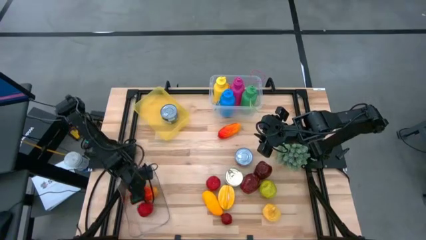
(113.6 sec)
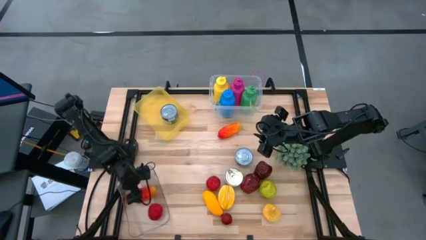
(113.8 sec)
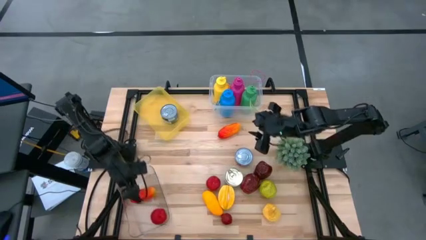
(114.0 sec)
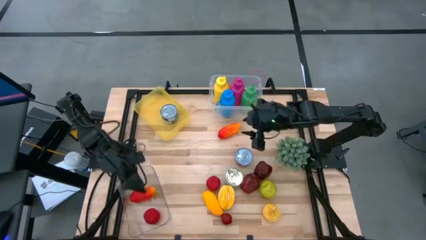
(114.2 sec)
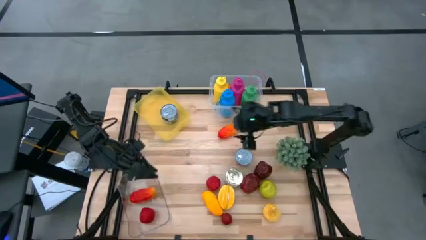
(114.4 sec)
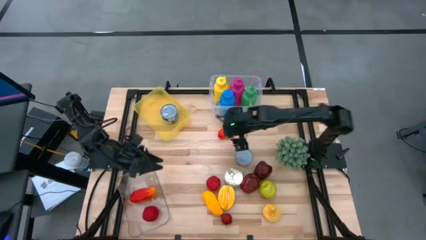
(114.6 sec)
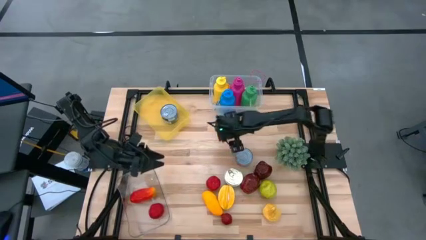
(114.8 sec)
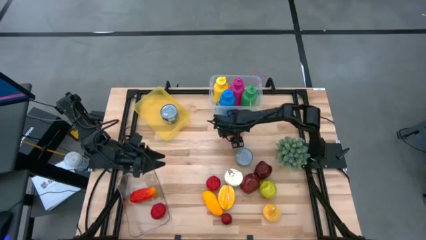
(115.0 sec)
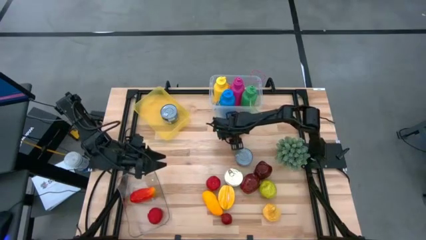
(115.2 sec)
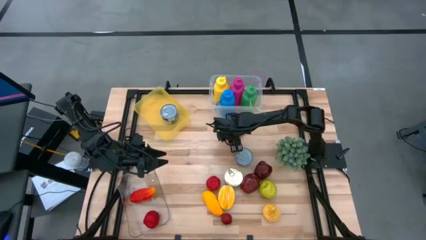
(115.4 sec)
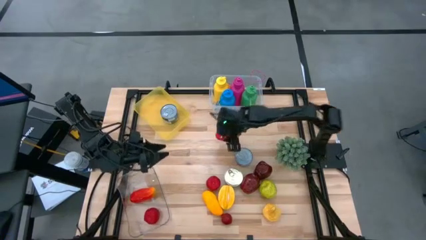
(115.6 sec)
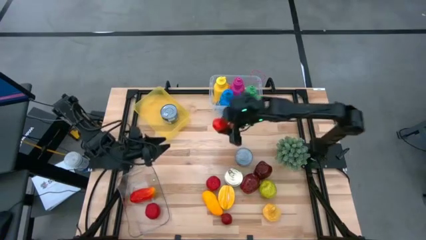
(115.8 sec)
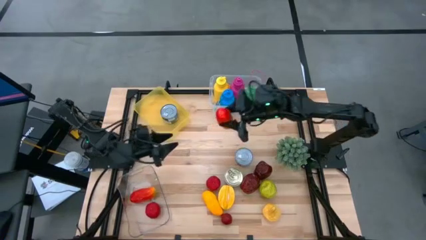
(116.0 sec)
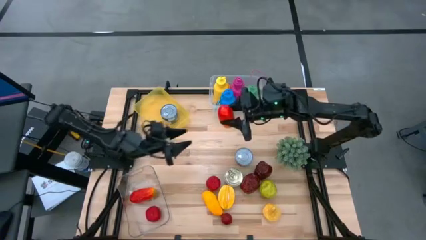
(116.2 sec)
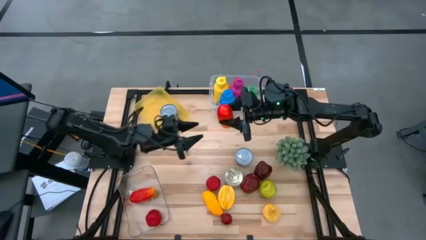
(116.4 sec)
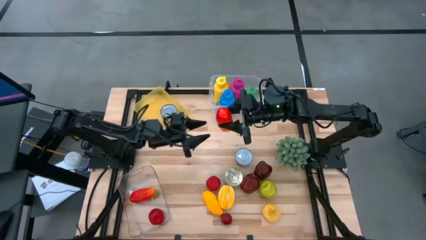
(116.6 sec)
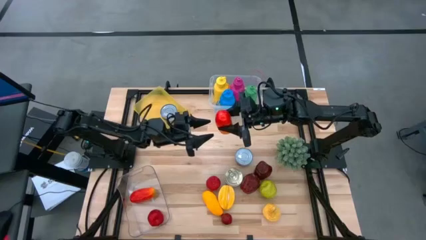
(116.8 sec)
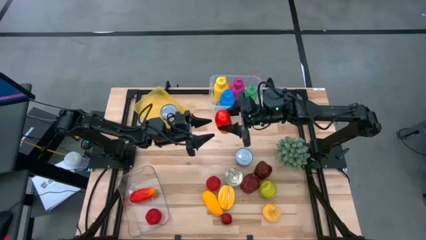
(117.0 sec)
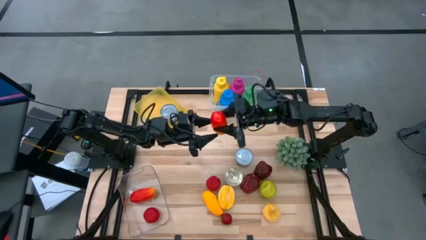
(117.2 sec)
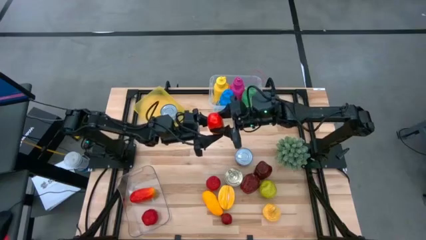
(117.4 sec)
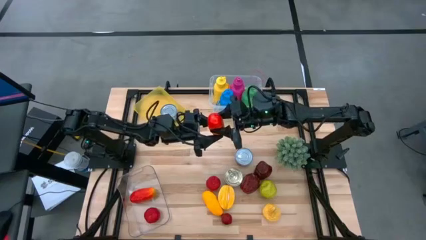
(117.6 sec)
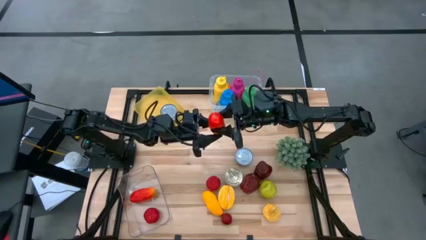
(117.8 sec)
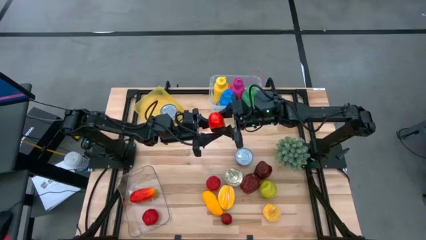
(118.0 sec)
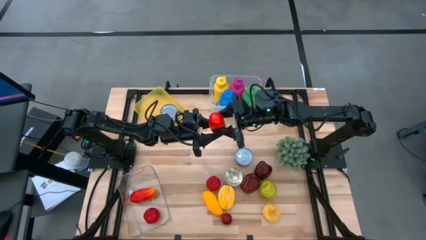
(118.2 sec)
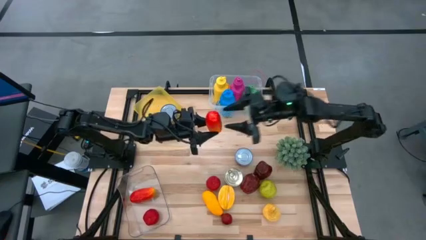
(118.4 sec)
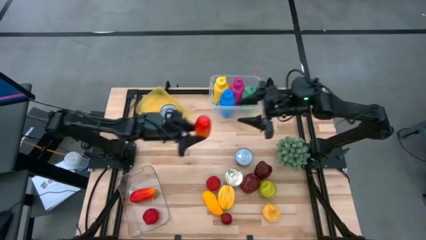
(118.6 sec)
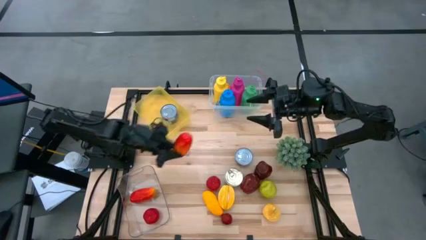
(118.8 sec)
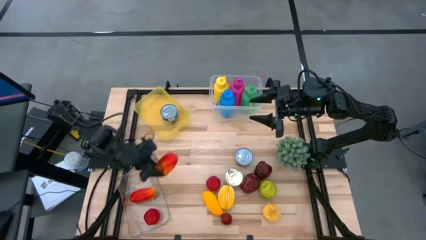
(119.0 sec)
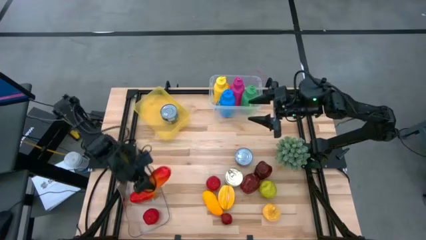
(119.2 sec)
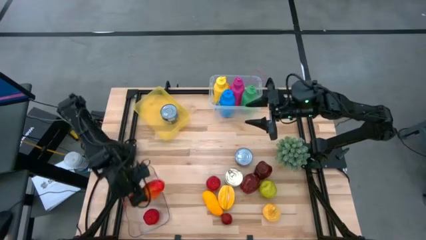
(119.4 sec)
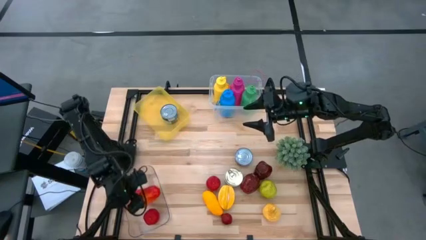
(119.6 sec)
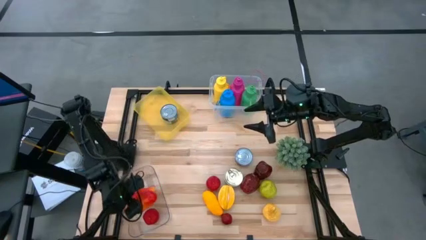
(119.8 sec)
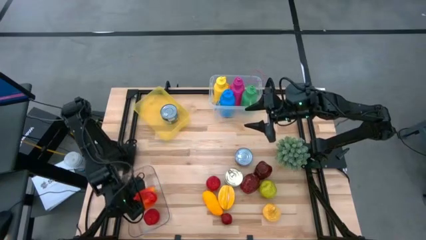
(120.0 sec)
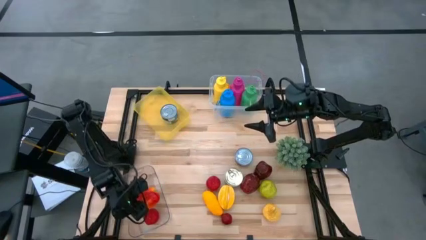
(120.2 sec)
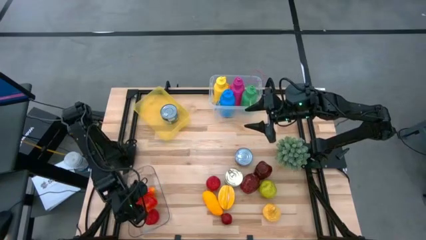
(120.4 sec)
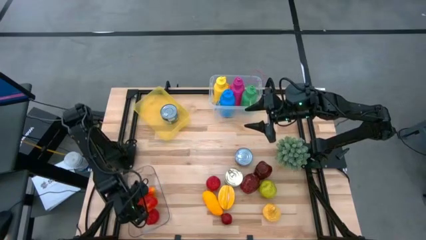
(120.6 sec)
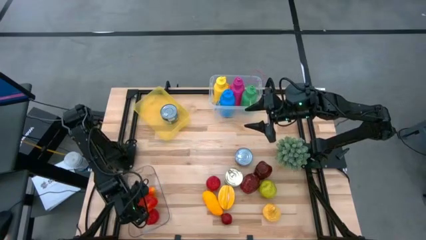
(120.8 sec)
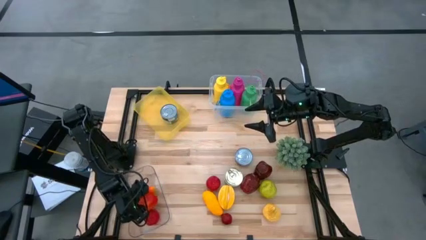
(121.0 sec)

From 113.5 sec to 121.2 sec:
Task: Pick & Place Food Item
Put the red mango into the transparent bin
